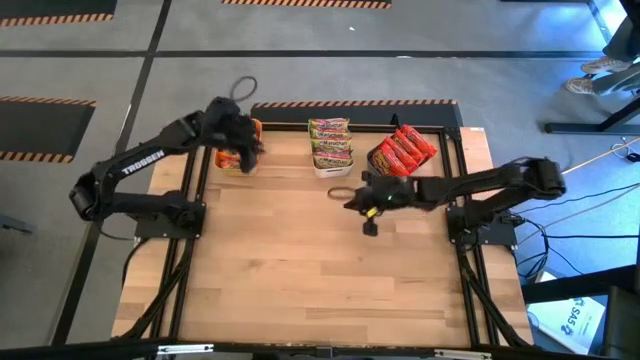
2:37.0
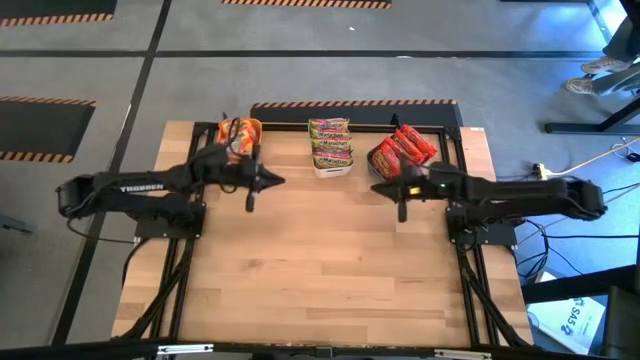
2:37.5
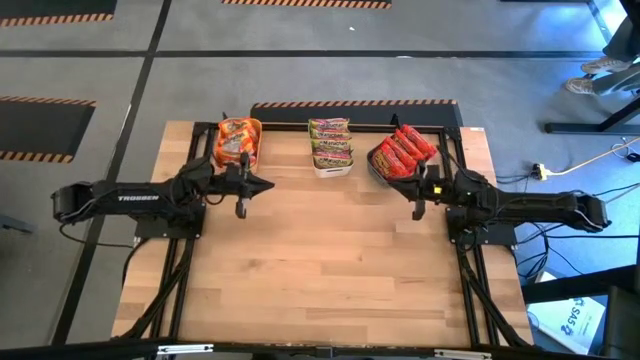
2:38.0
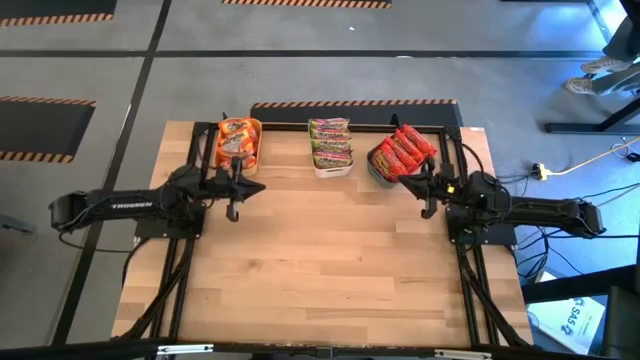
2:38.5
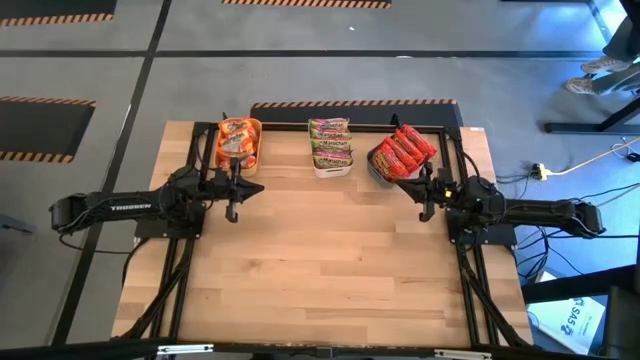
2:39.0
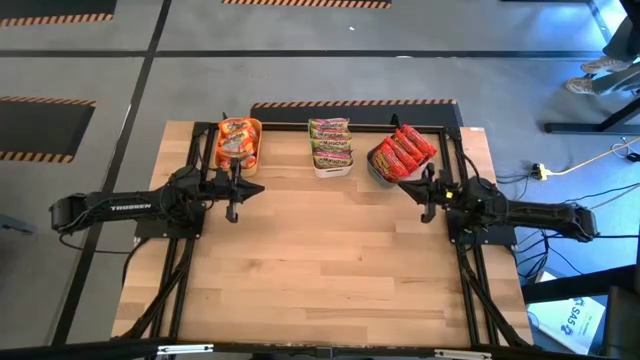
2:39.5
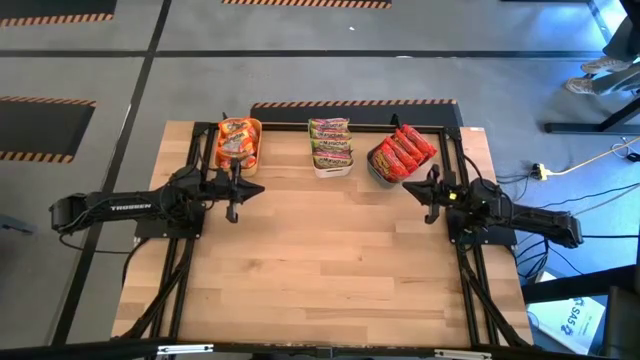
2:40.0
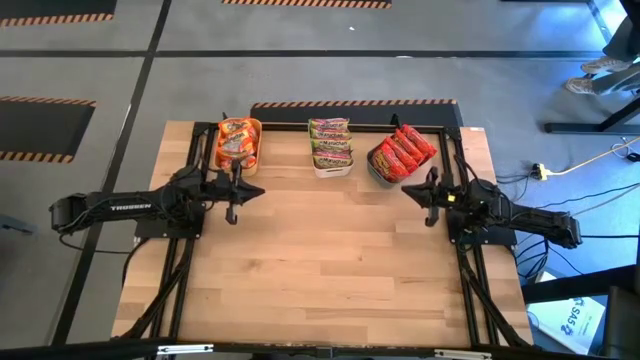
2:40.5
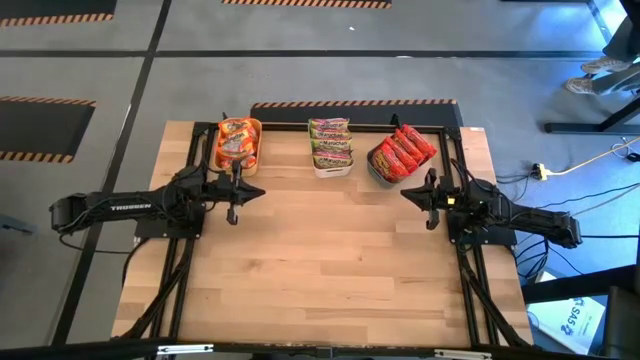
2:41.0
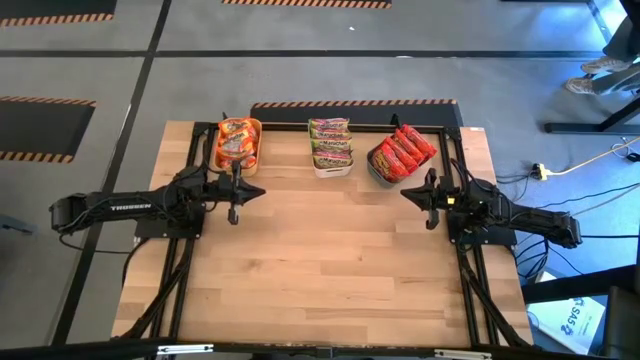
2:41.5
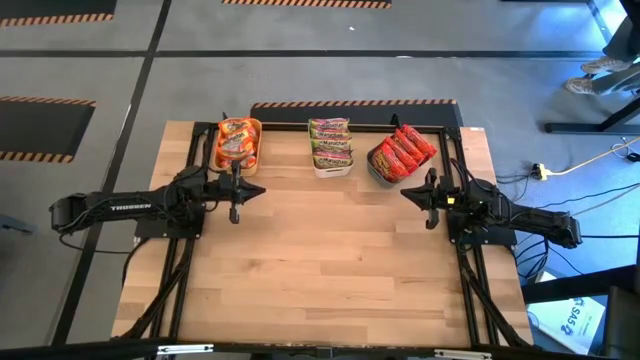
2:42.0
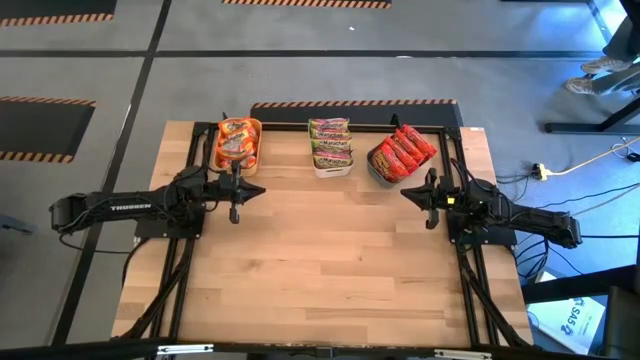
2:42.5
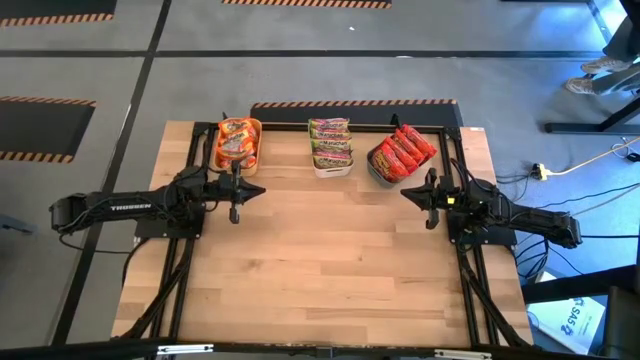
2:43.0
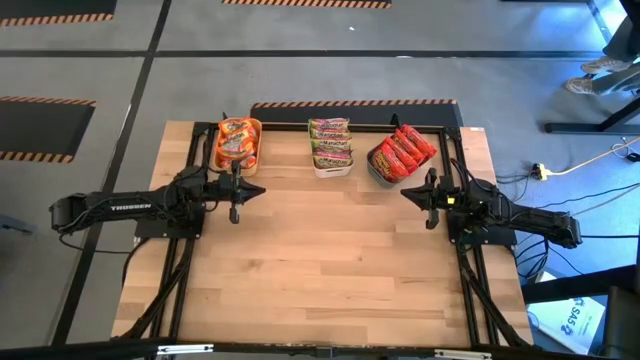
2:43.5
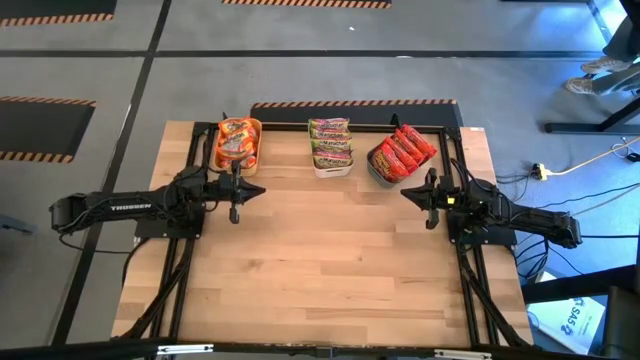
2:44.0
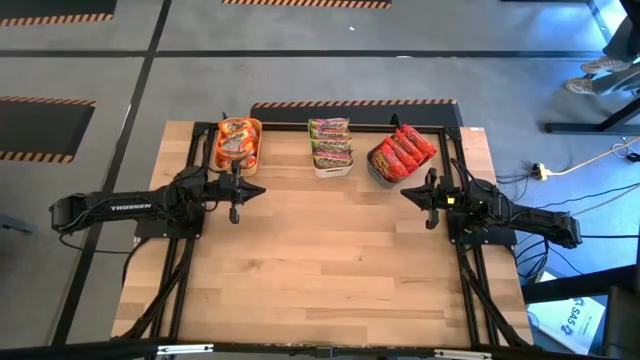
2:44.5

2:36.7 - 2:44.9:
Task: Sort Maruchan noodles
Return to Home Position

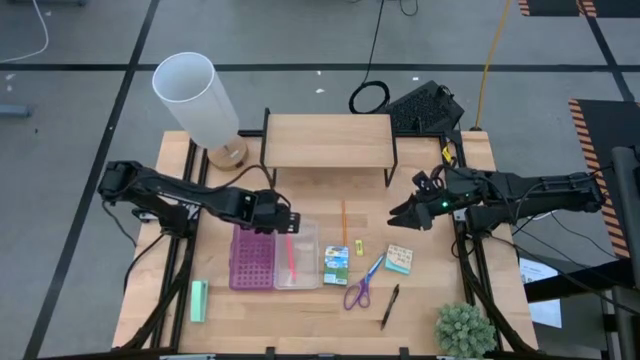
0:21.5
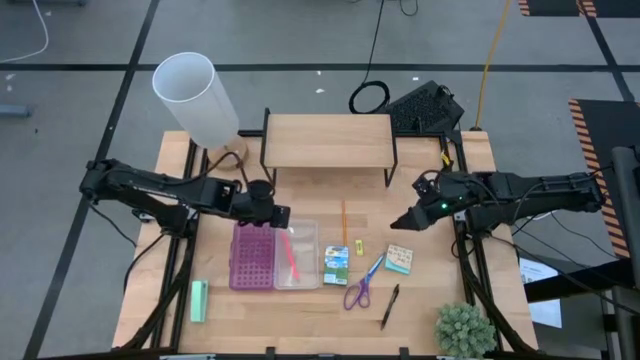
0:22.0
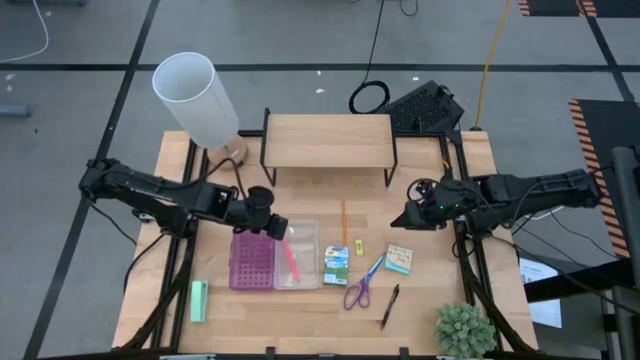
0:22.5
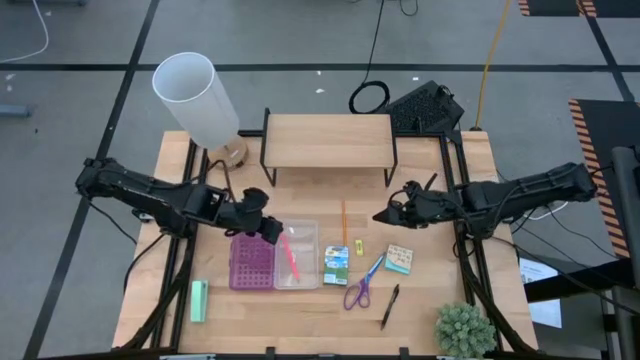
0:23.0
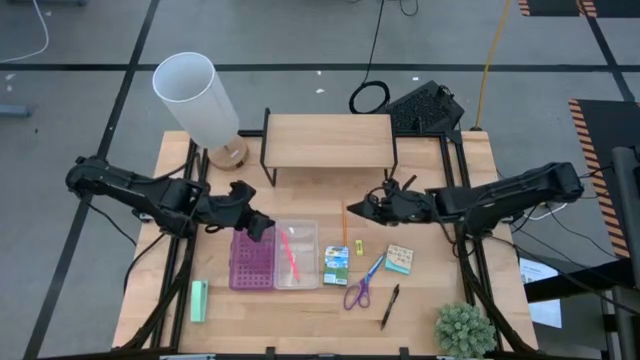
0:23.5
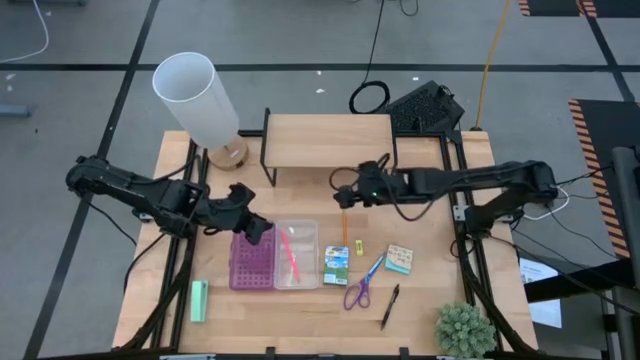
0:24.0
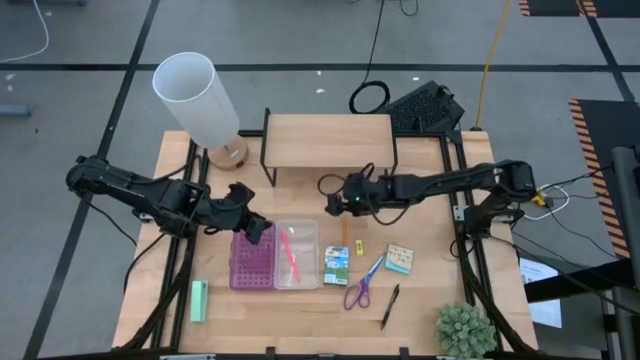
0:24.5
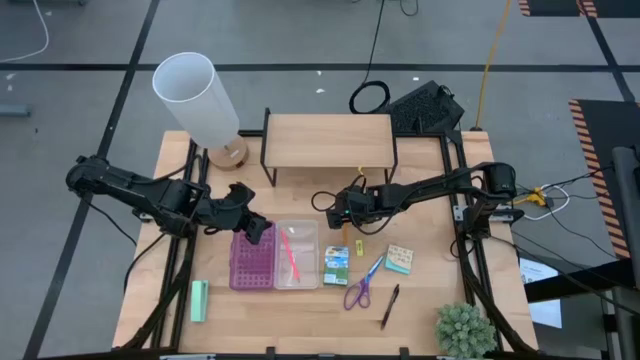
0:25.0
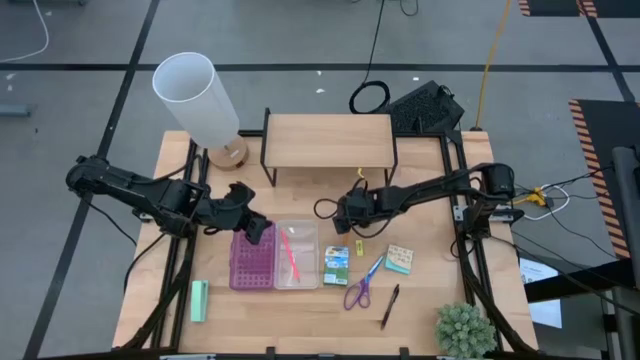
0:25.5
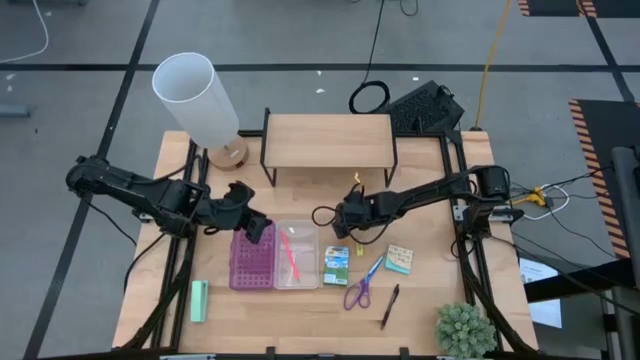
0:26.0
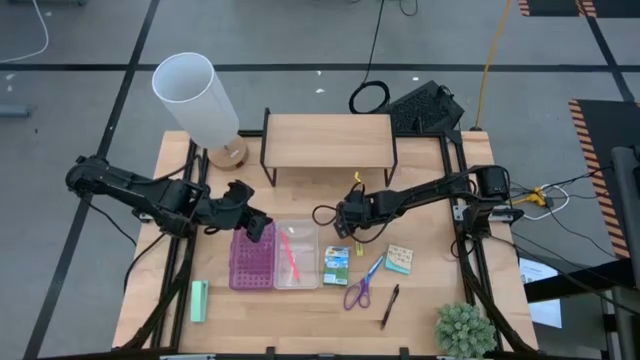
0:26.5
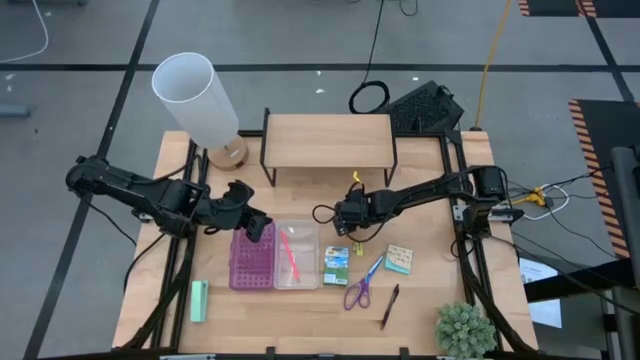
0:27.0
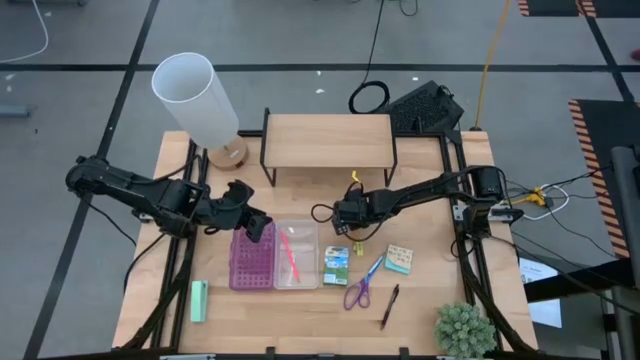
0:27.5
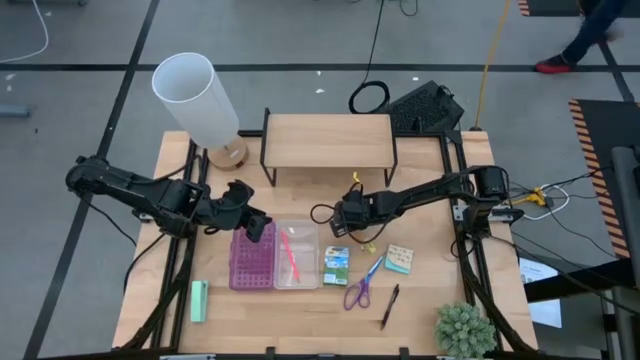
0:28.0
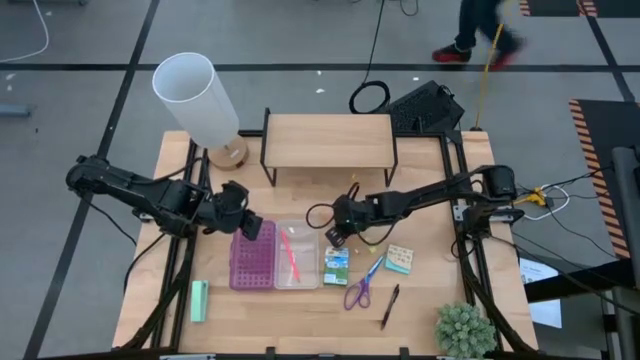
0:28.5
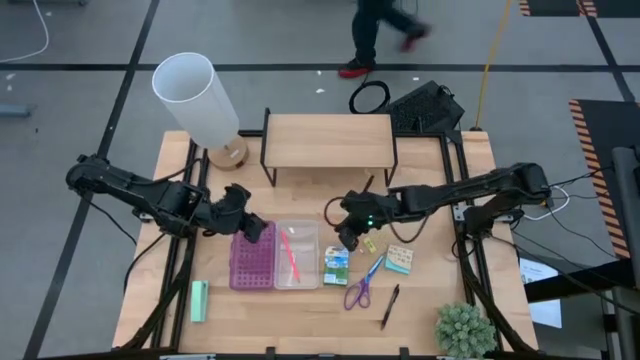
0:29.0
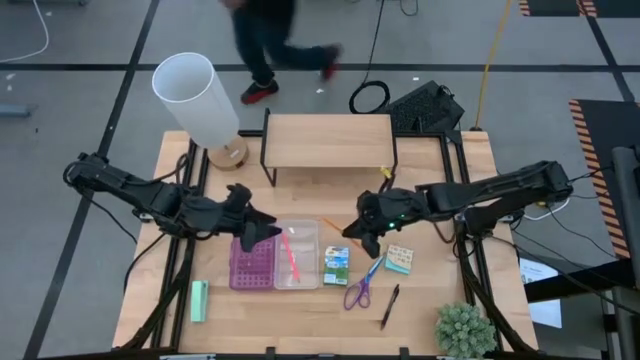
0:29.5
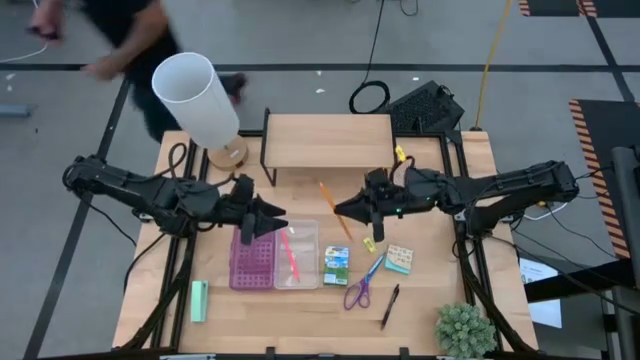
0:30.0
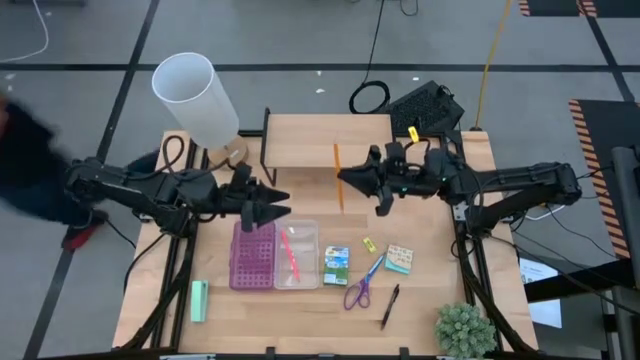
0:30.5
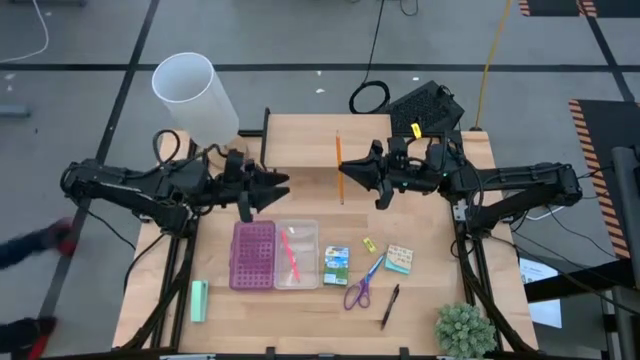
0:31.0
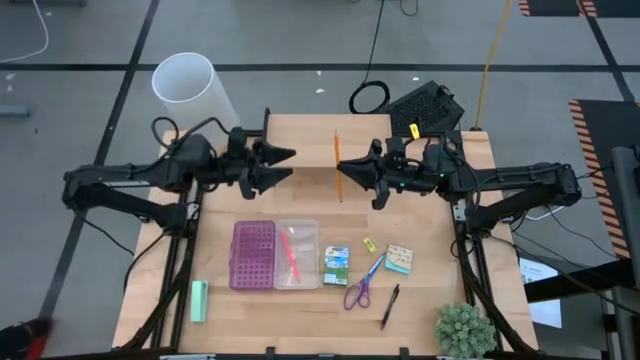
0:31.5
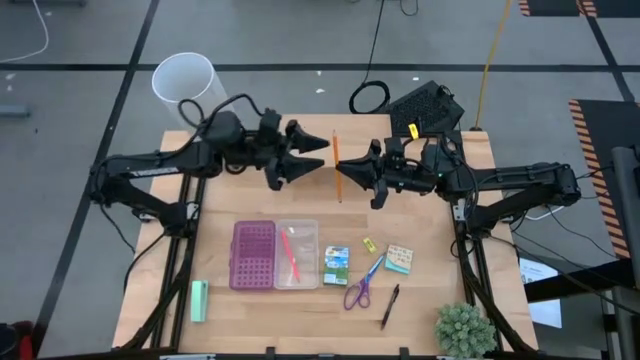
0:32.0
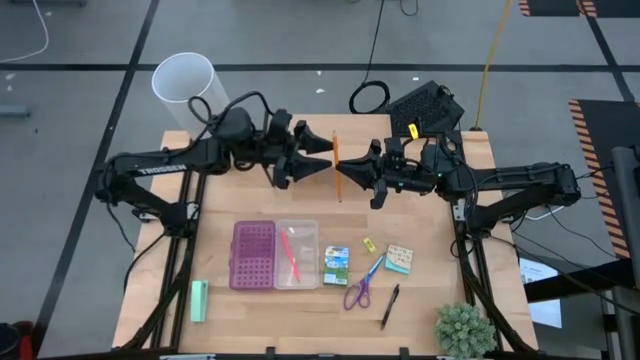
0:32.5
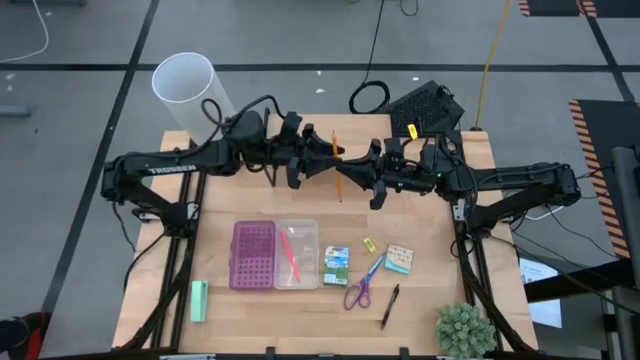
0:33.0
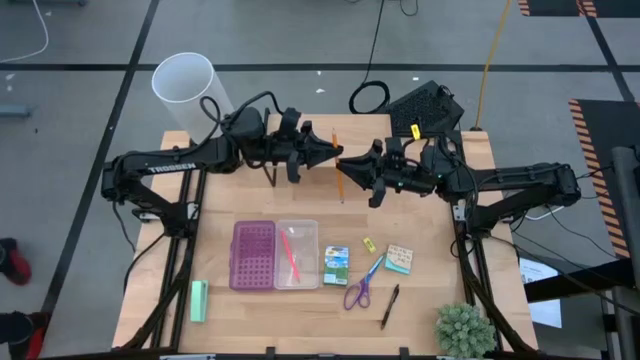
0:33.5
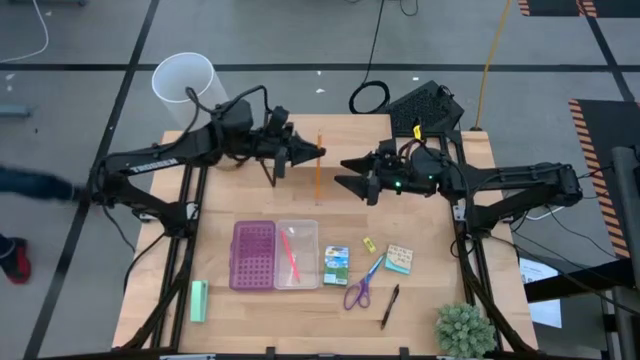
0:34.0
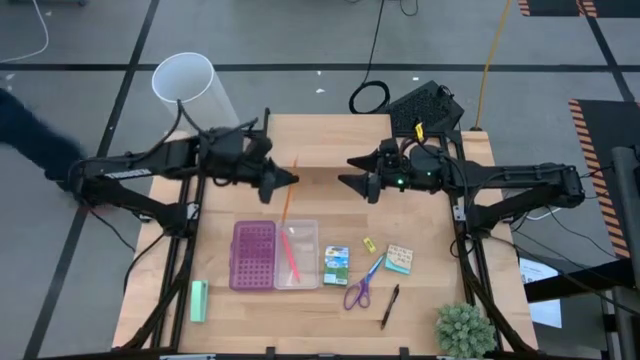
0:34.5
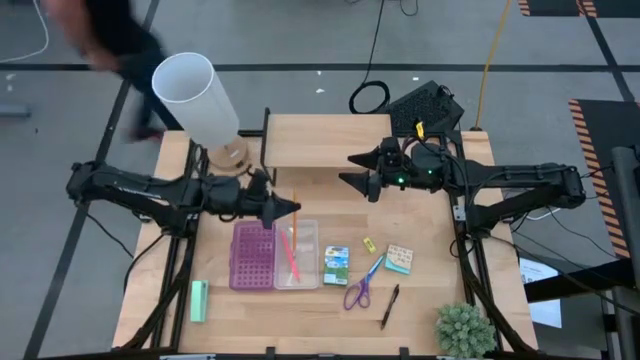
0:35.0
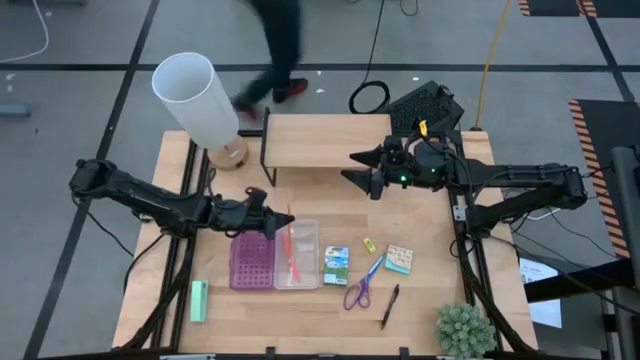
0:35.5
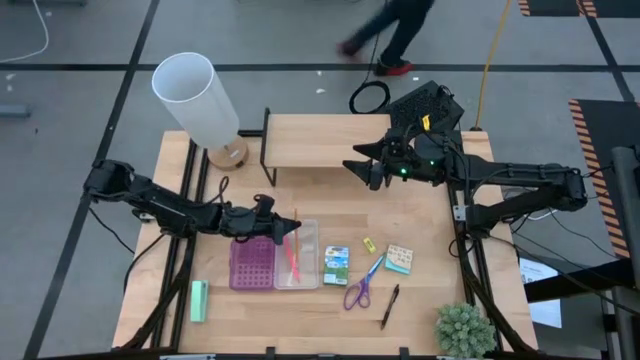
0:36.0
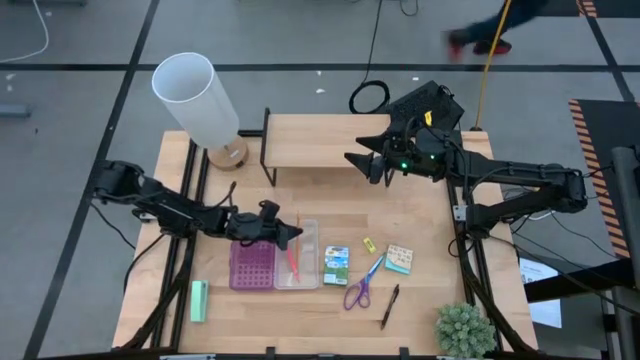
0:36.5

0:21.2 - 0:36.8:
Task: Pack school essentials
Put the orange pencil into the violet supply box
